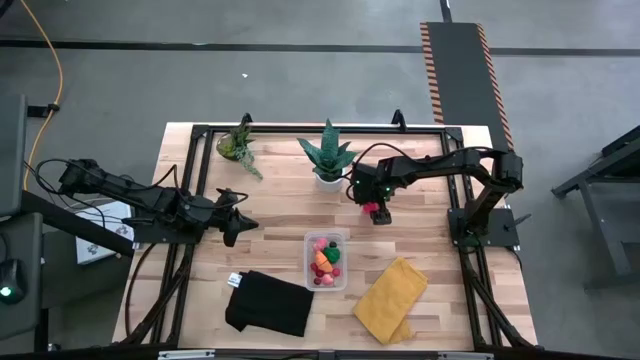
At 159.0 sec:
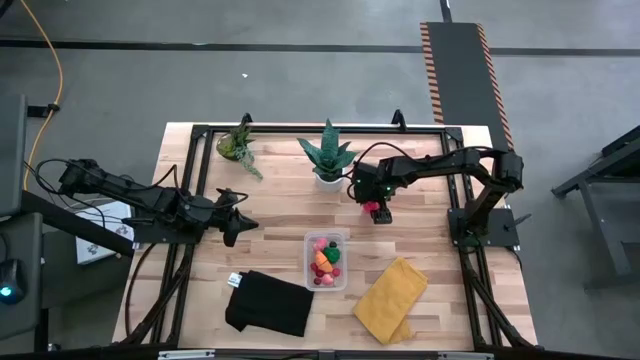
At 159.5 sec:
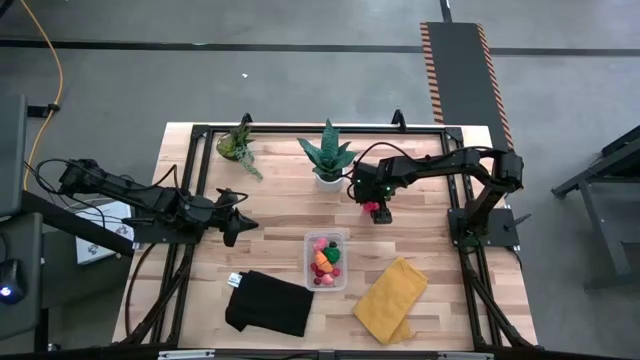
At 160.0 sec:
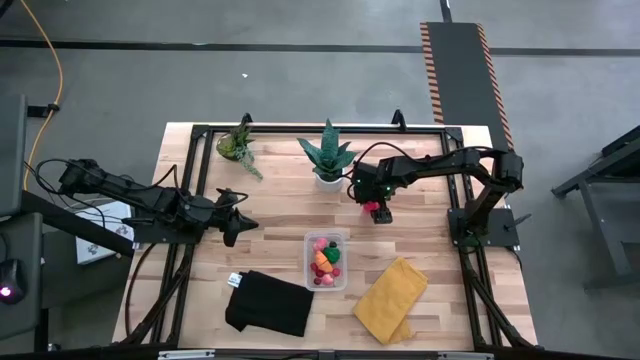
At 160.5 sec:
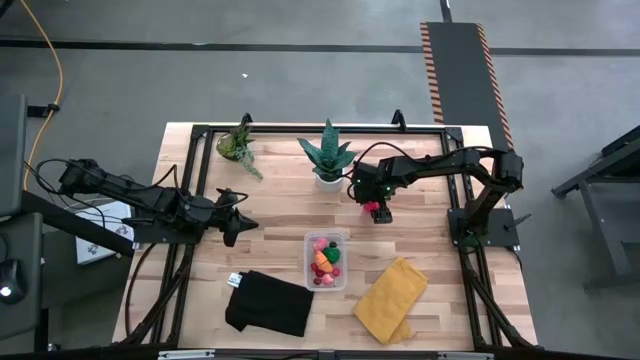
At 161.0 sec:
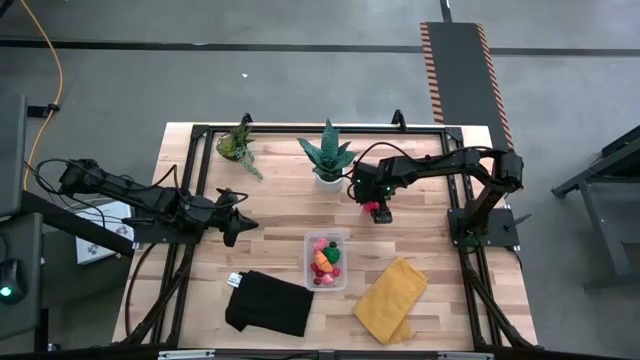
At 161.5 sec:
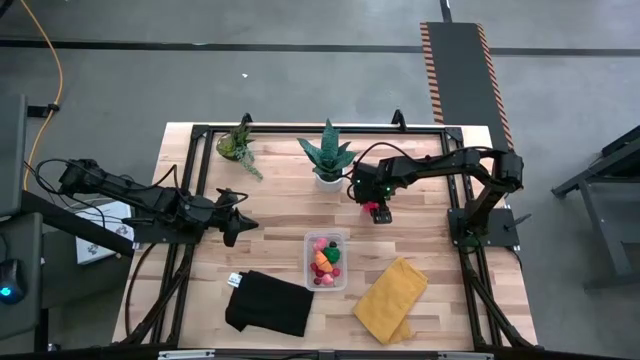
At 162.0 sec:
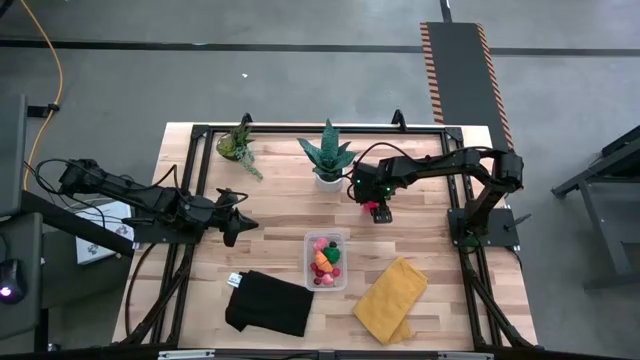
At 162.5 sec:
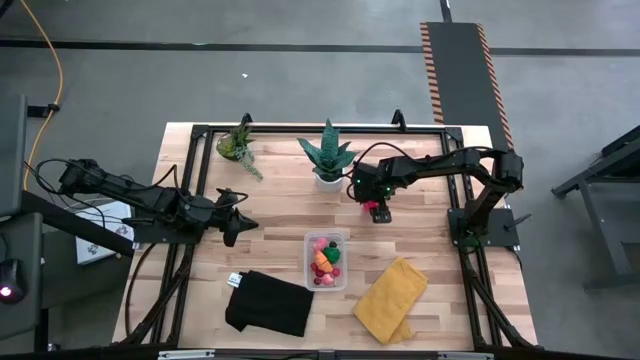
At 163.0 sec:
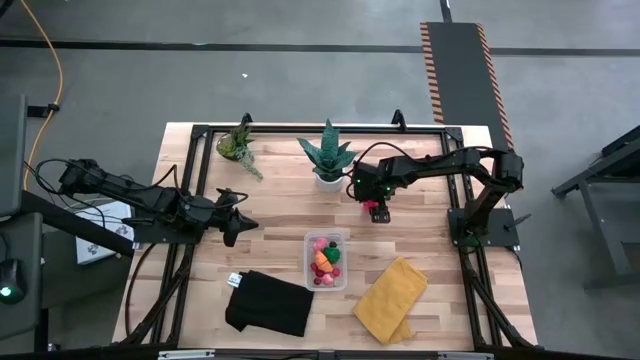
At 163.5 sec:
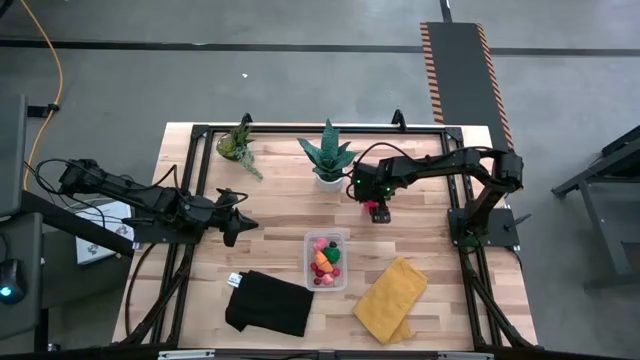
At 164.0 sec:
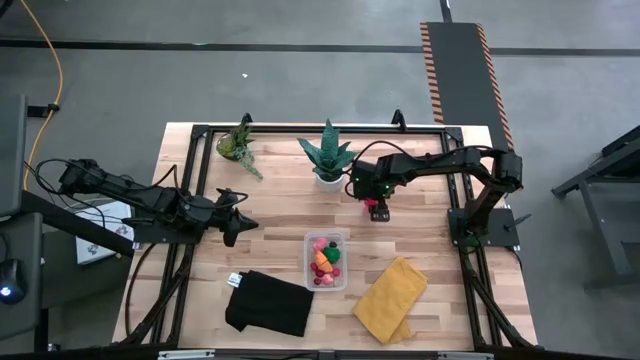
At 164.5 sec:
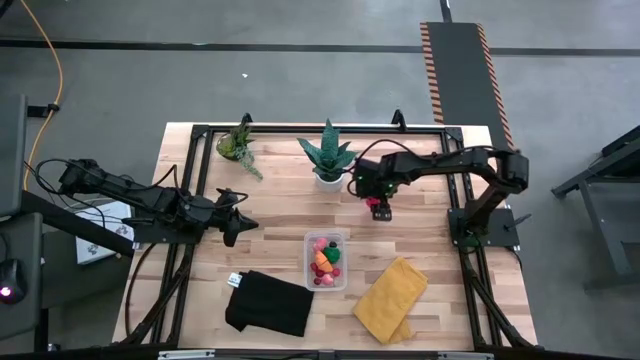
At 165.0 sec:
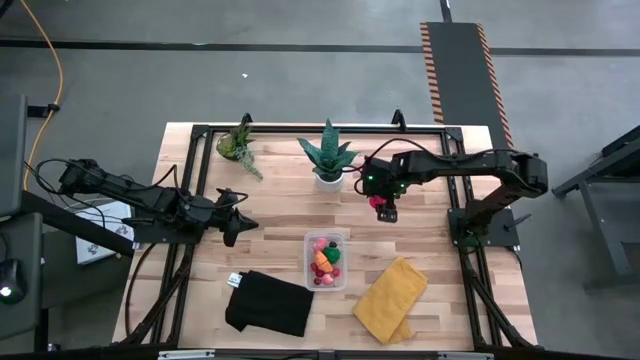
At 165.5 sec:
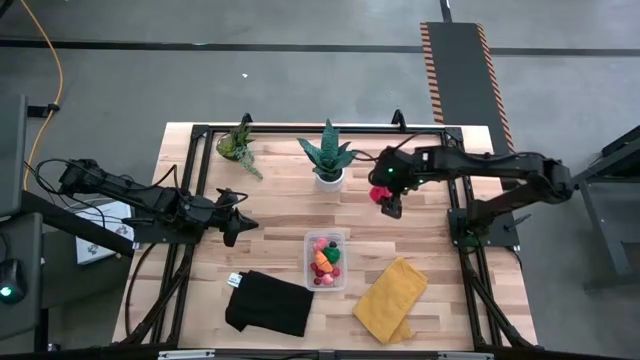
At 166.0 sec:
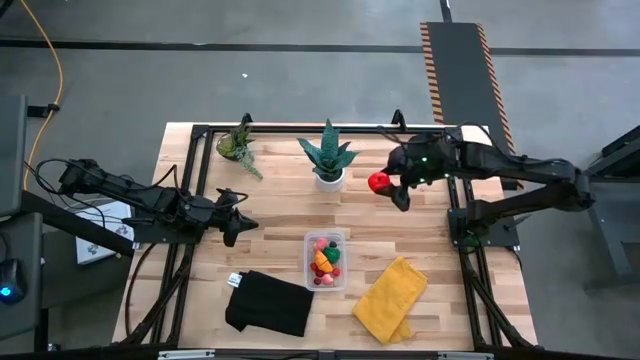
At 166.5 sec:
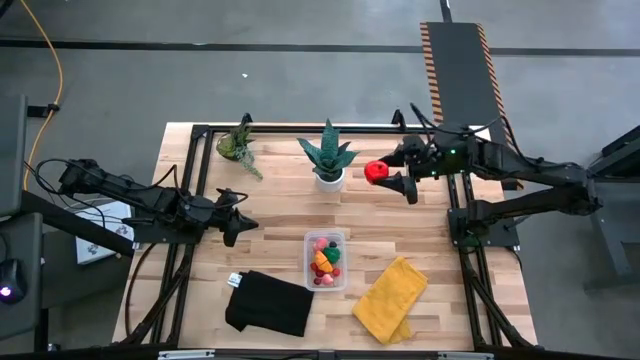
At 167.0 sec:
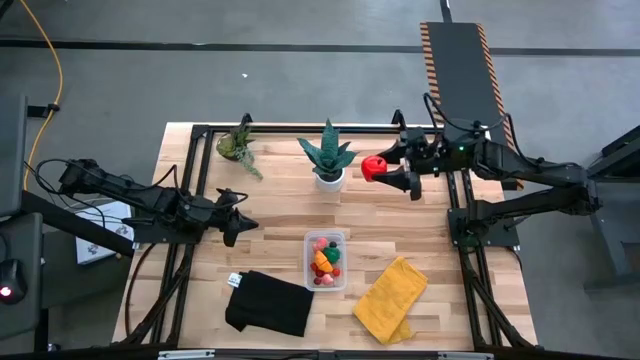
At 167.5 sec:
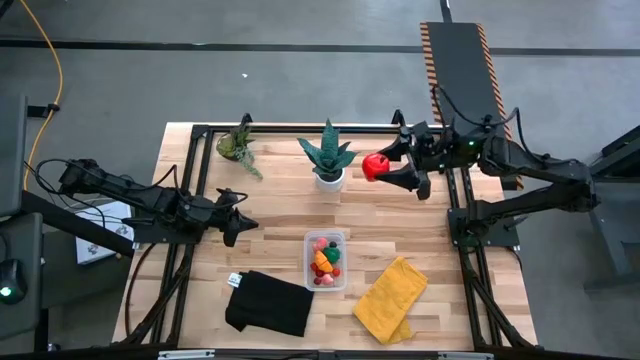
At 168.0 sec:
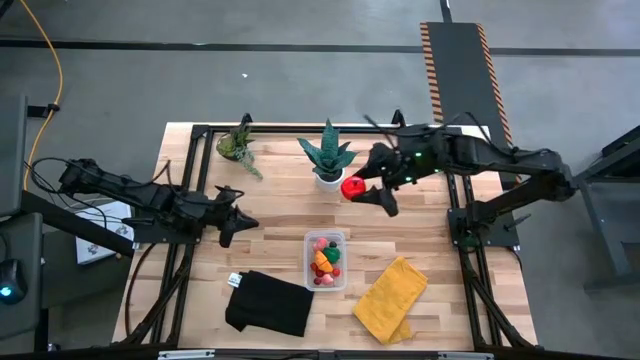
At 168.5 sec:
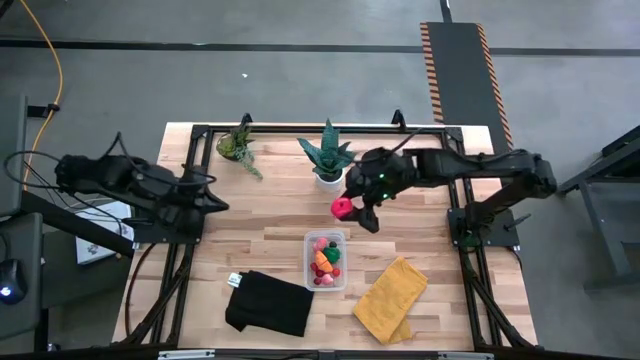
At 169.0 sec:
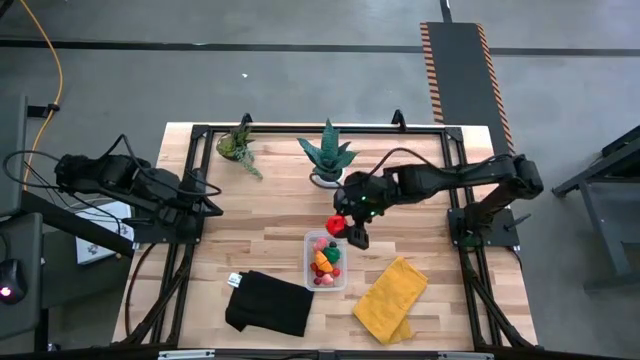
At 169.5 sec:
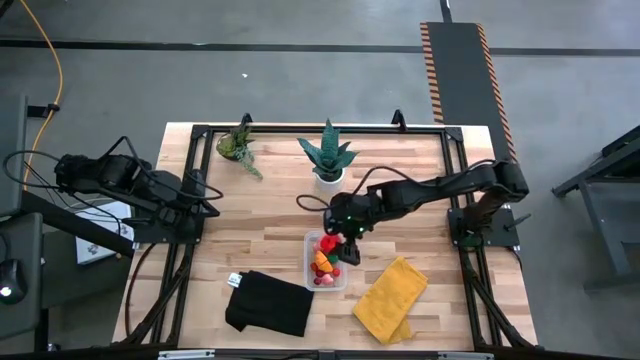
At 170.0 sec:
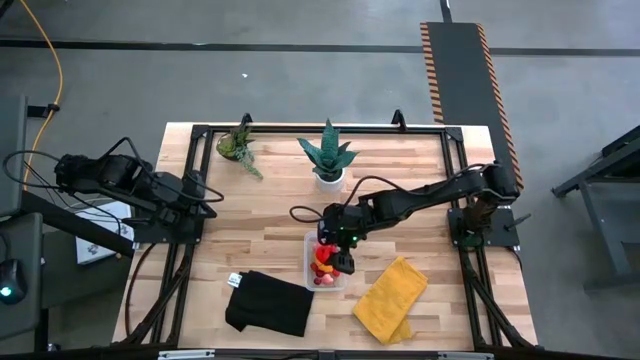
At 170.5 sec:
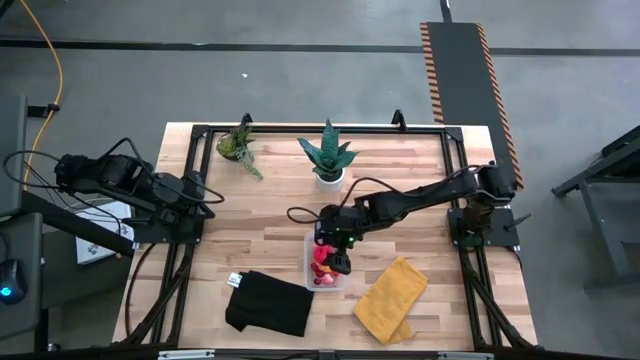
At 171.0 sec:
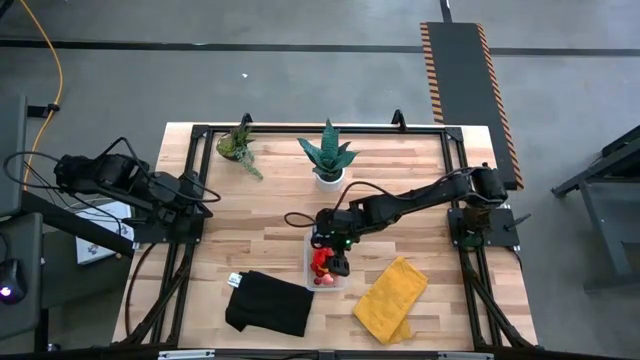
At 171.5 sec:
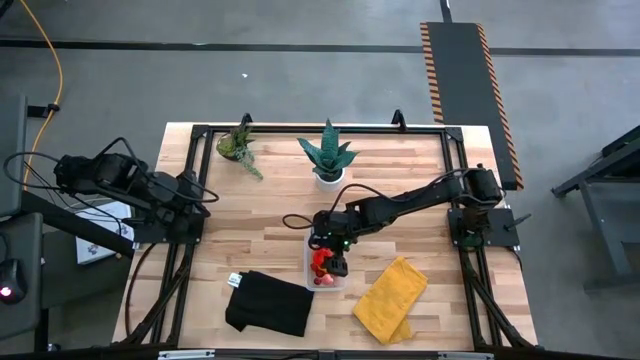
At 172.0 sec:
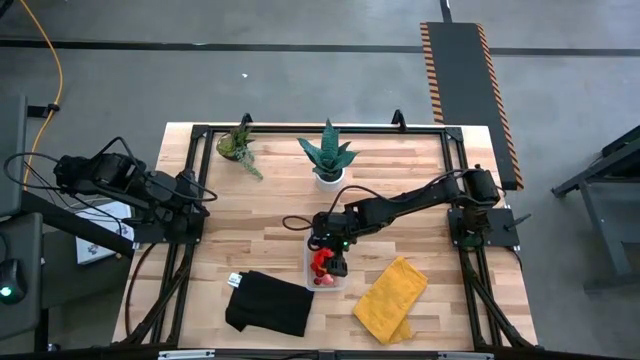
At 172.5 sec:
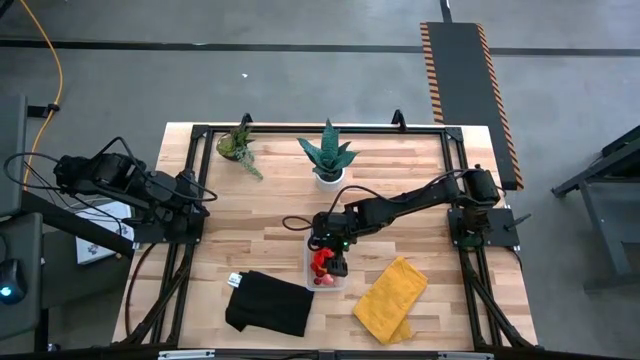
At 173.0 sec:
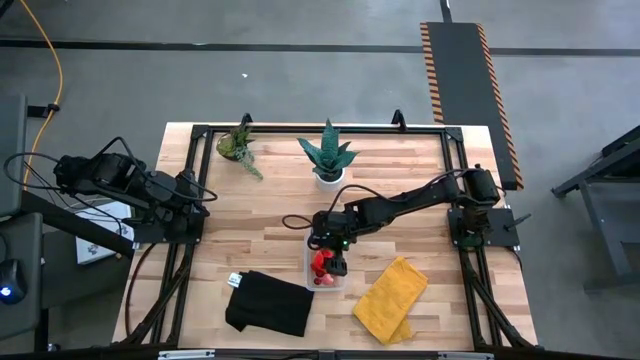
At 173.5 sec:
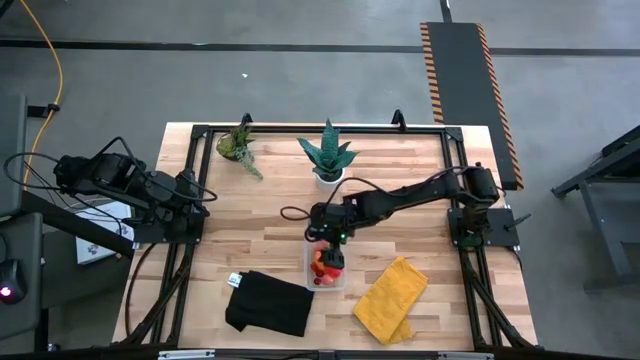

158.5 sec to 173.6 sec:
Task: Pick and placing Produce into tupperware
Put the apple into the transparent container

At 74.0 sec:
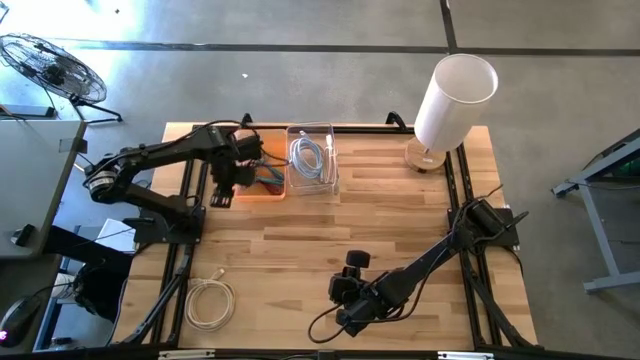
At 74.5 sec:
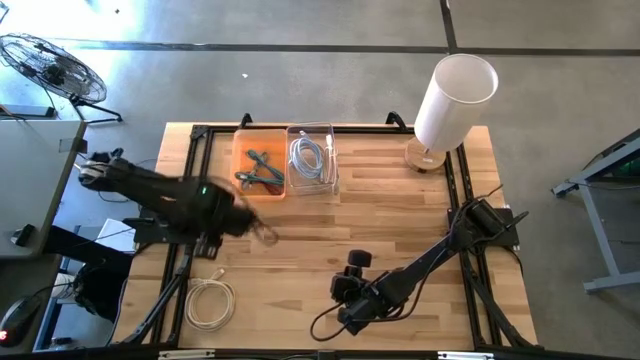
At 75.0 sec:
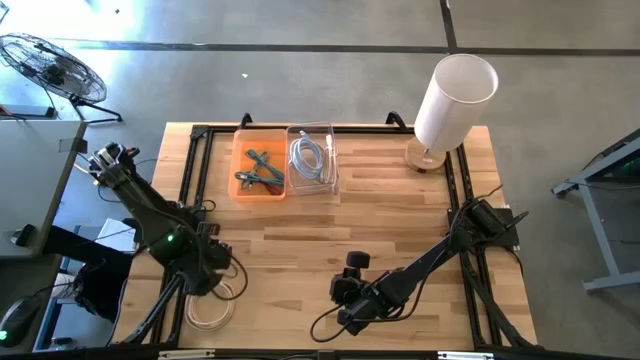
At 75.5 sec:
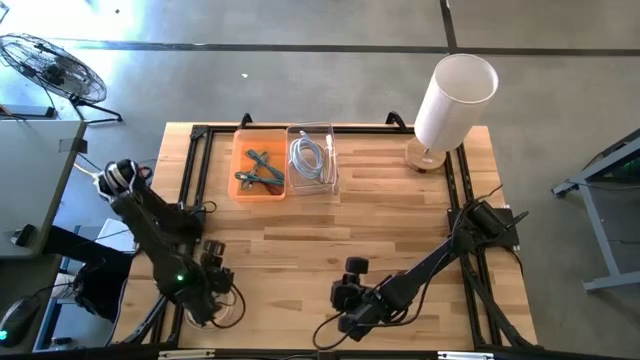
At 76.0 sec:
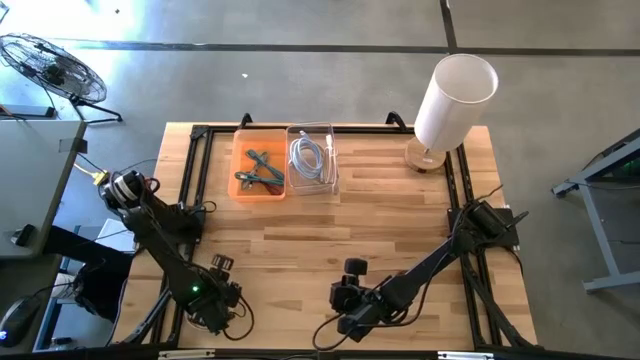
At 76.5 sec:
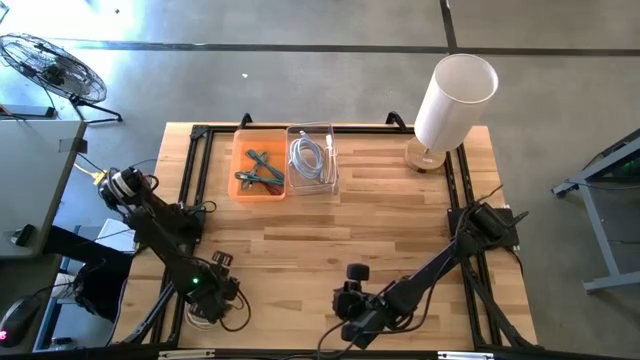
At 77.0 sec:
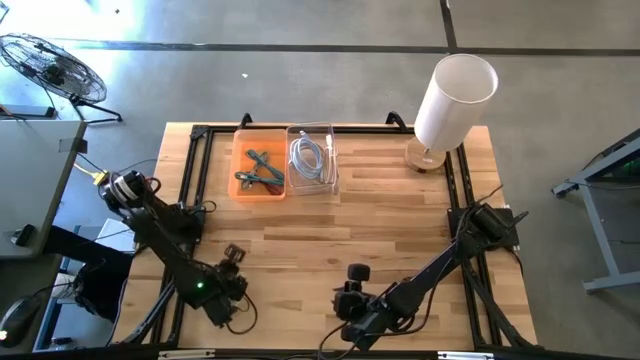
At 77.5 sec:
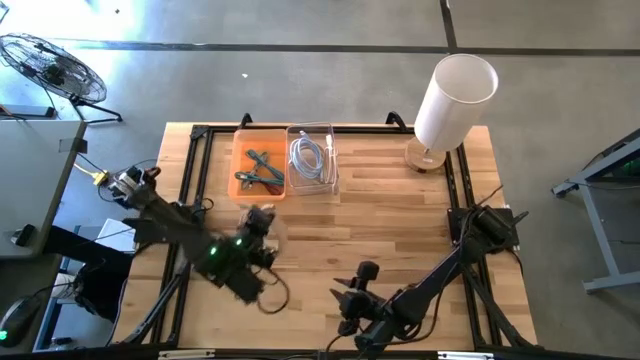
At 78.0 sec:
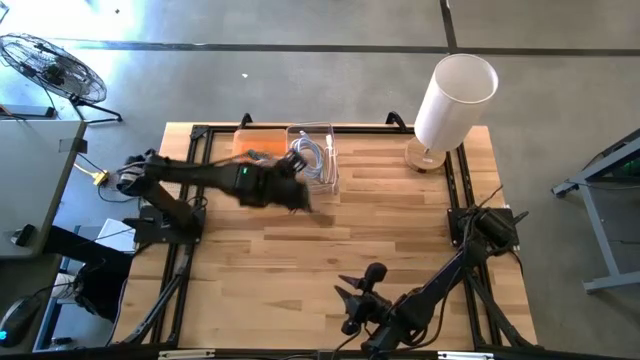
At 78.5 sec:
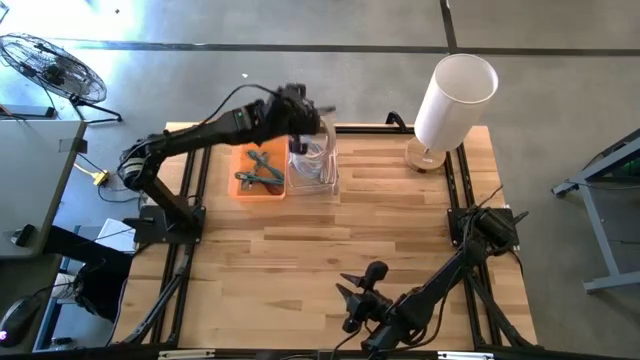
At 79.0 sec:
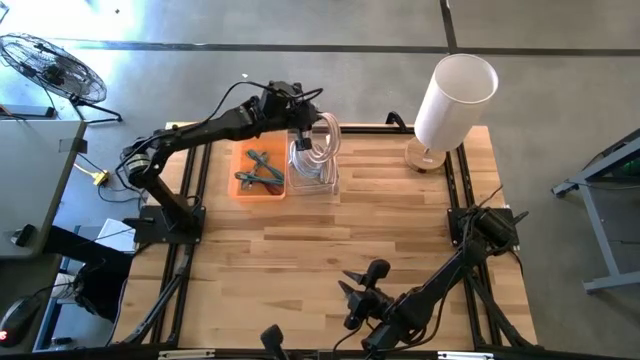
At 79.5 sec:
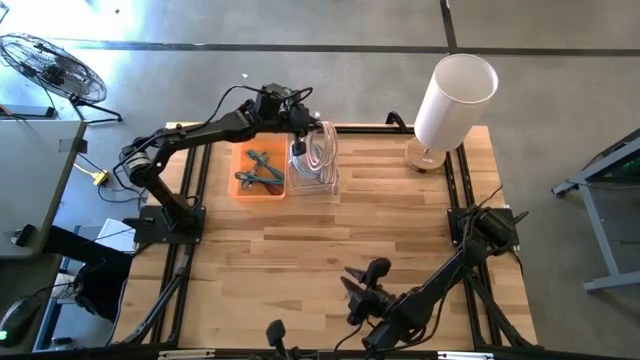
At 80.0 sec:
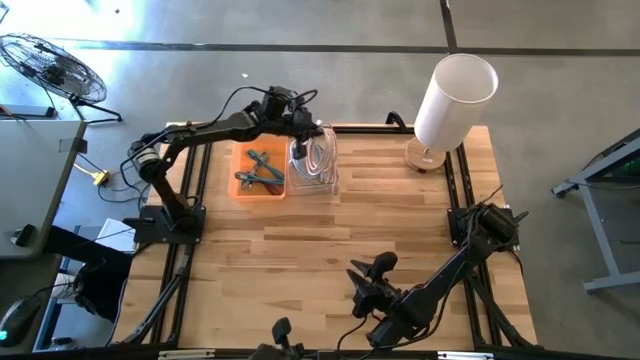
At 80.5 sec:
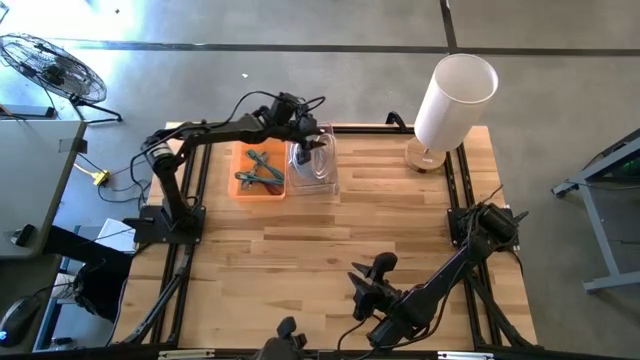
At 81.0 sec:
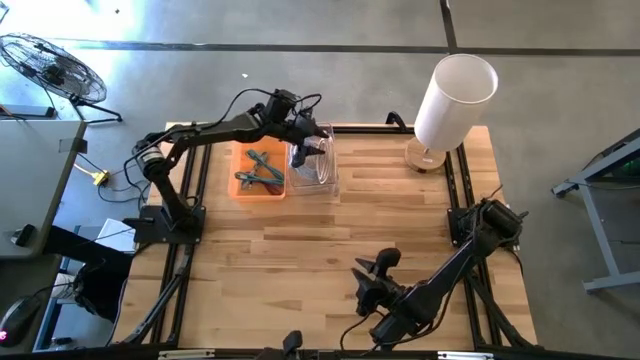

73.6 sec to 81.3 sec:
Task: Pick & Place USB Port
Put the brown HDMI cable into the transparent bin
